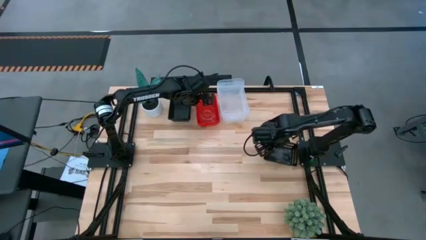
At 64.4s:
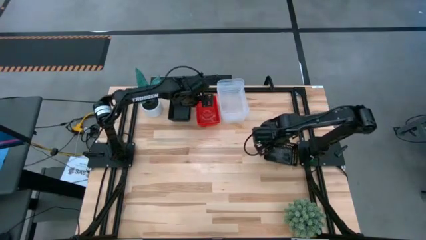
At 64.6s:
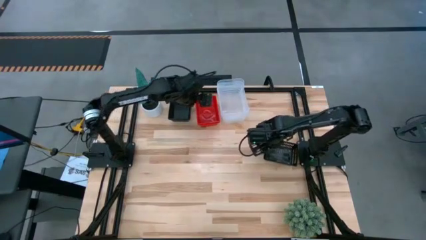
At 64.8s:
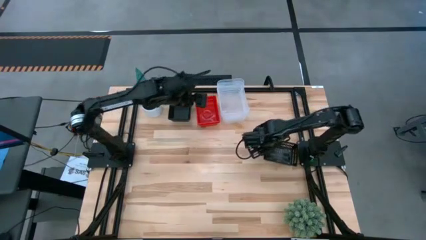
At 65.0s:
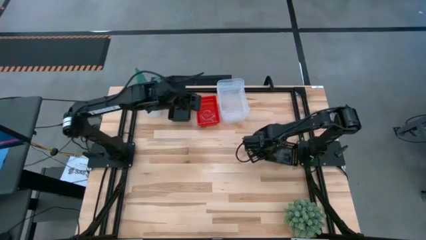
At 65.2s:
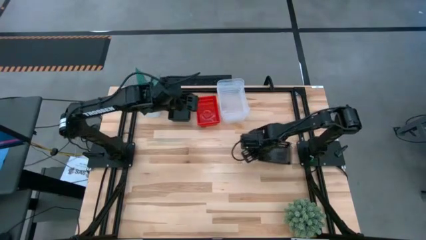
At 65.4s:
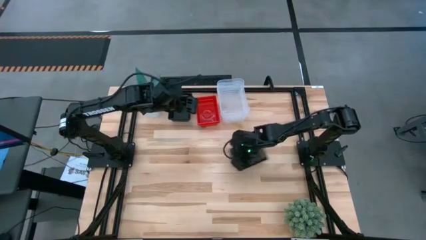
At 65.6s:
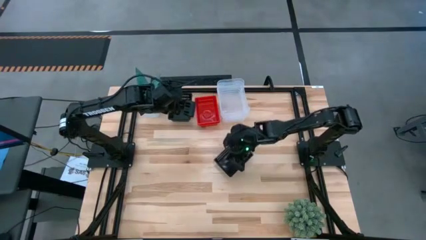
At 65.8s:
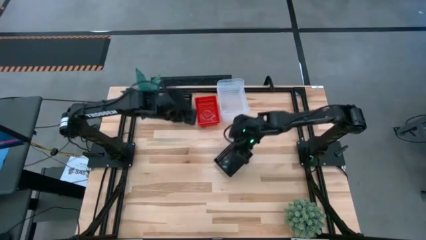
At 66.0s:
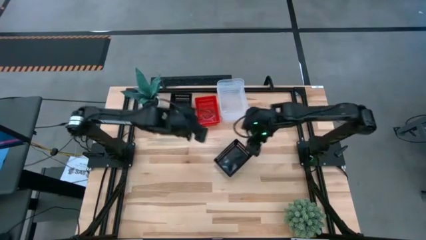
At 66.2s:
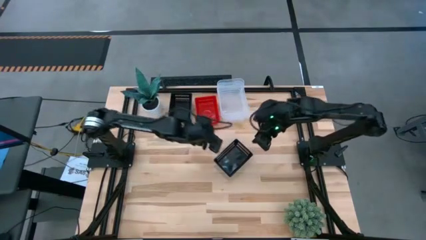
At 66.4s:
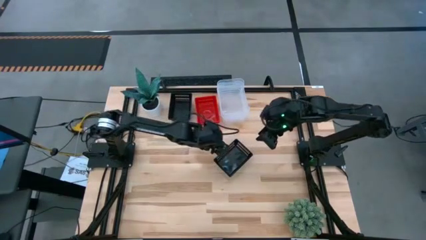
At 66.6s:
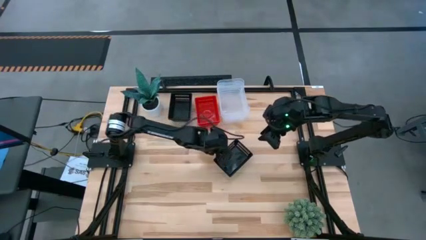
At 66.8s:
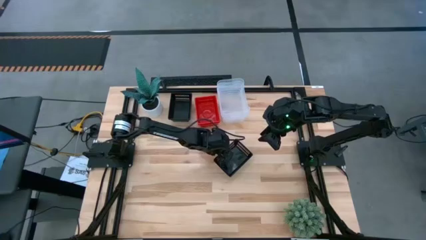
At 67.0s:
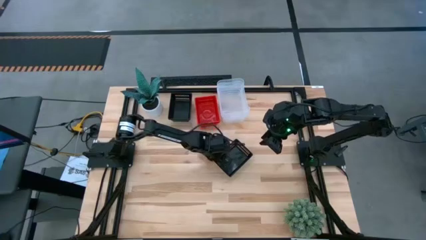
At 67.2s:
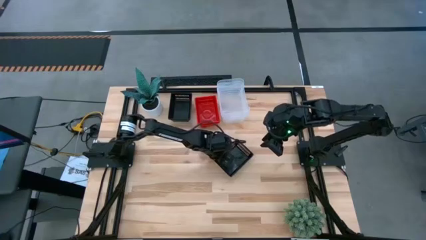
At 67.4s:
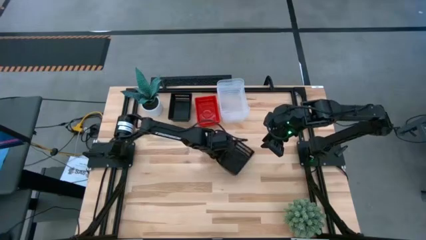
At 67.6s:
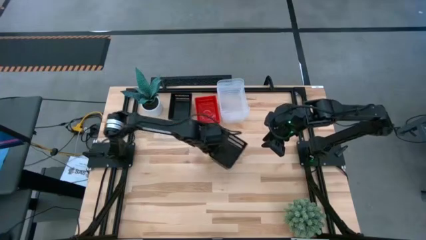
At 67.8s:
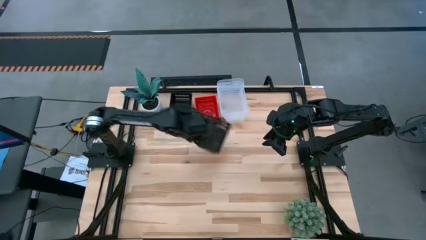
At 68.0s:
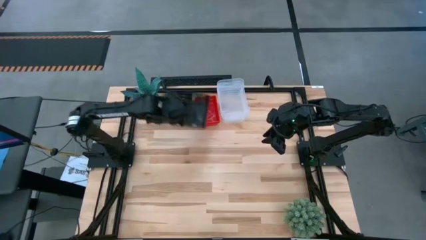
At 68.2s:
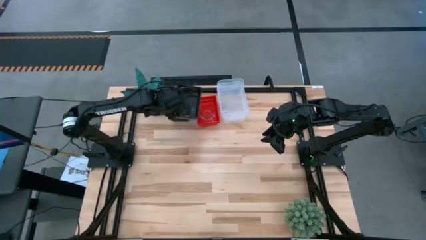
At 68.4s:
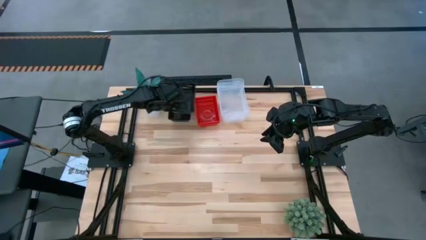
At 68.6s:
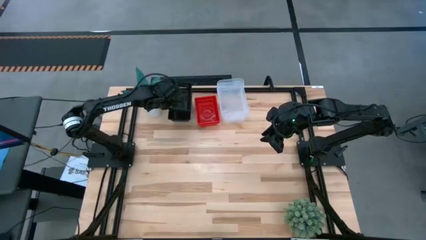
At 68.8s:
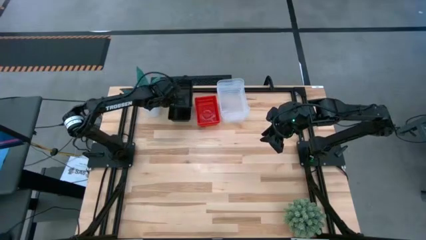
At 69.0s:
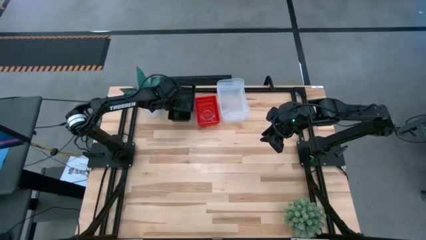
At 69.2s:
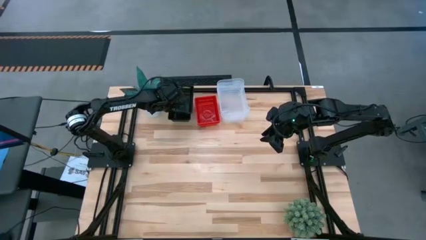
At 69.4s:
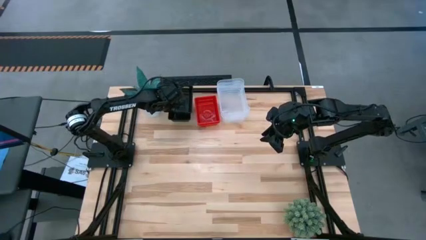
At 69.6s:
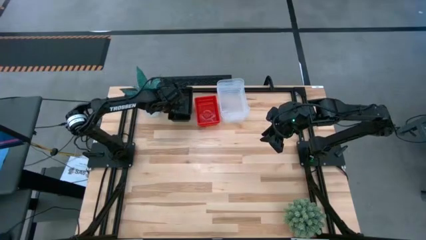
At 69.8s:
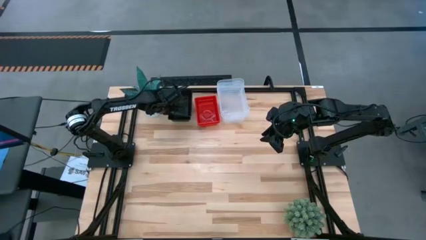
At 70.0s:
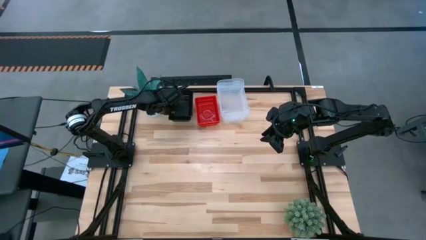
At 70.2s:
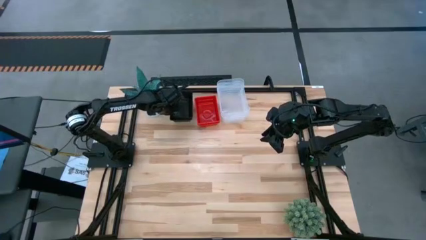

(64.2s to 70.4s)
Stack the black bin on the top black bins

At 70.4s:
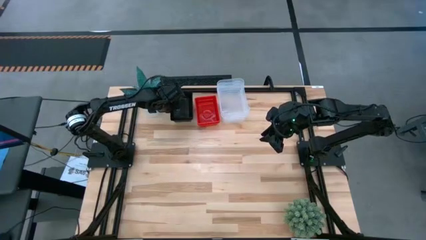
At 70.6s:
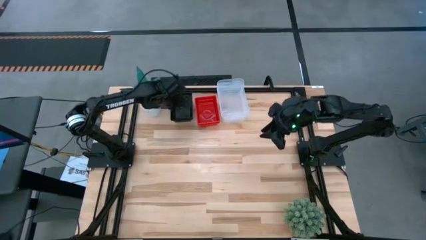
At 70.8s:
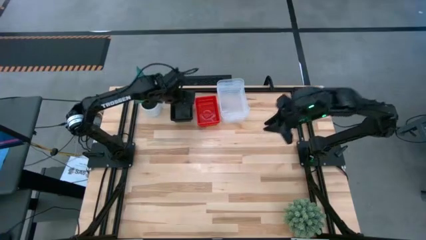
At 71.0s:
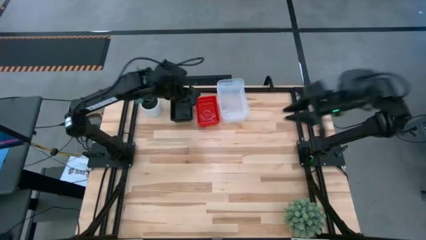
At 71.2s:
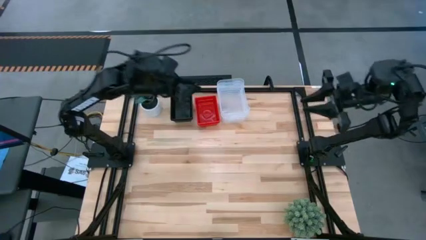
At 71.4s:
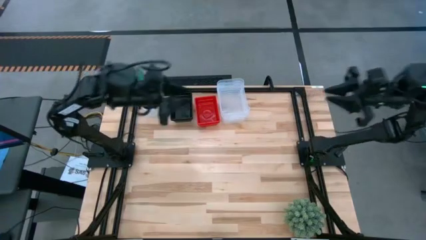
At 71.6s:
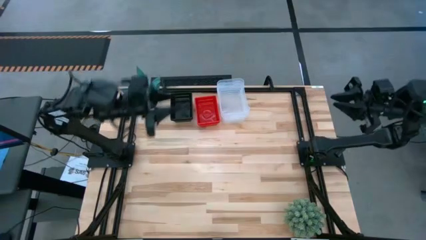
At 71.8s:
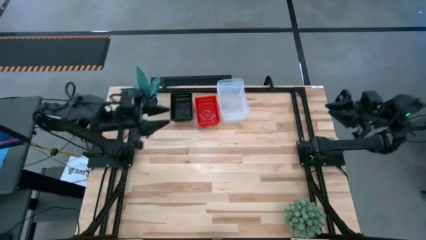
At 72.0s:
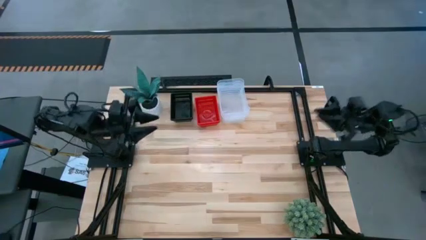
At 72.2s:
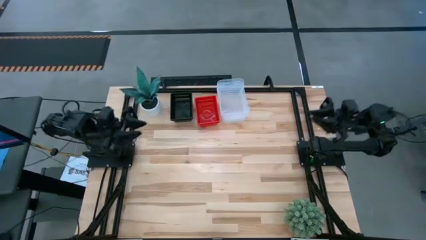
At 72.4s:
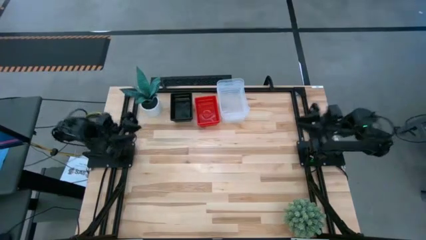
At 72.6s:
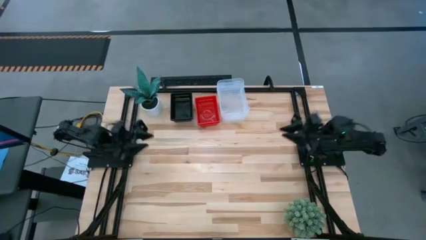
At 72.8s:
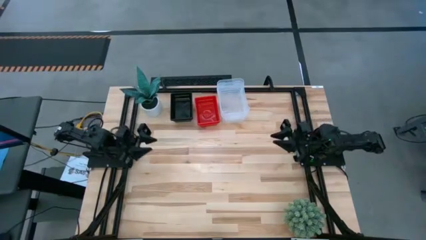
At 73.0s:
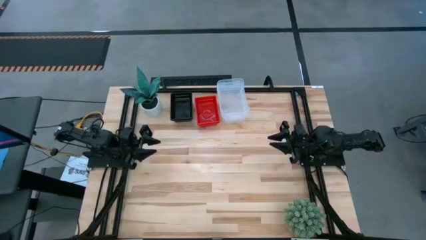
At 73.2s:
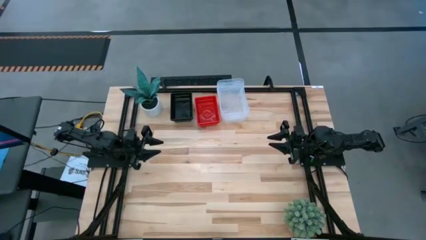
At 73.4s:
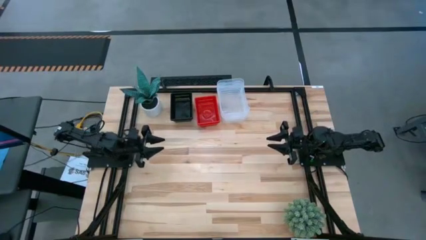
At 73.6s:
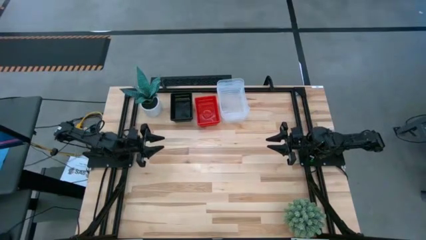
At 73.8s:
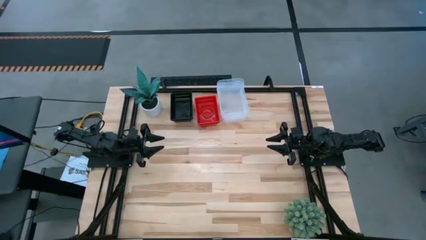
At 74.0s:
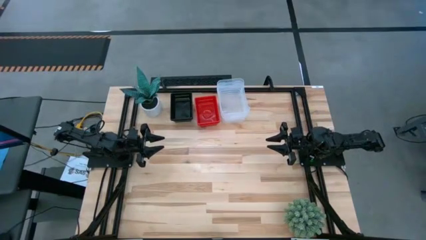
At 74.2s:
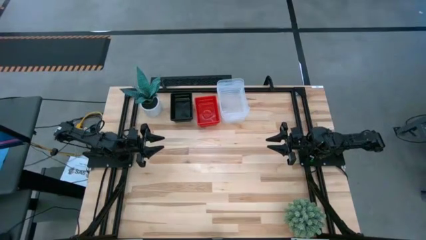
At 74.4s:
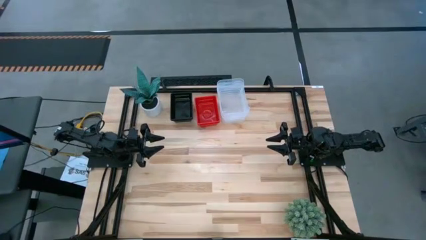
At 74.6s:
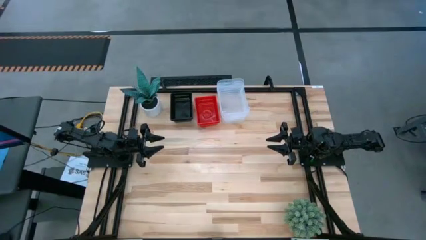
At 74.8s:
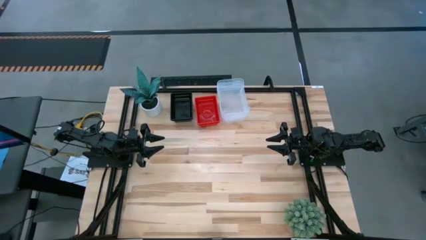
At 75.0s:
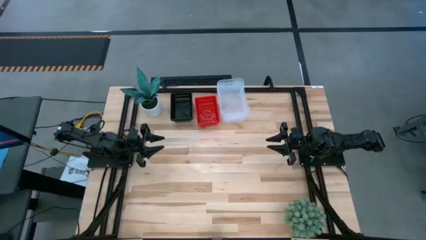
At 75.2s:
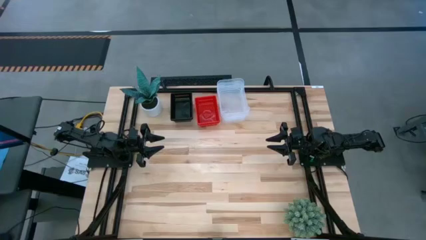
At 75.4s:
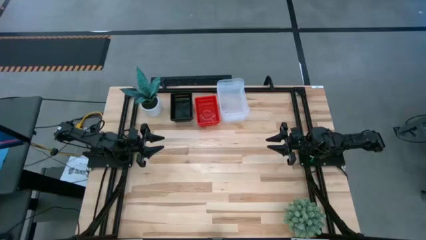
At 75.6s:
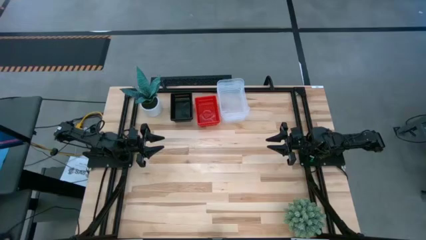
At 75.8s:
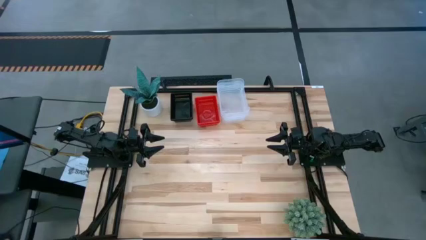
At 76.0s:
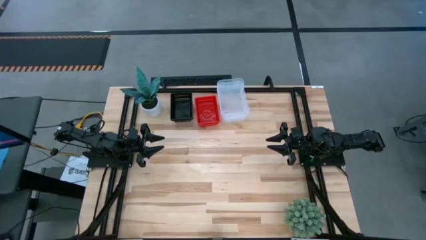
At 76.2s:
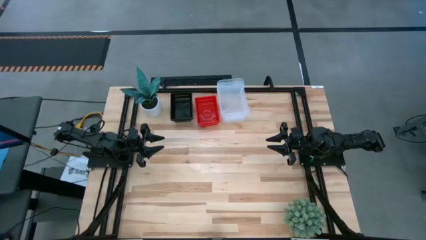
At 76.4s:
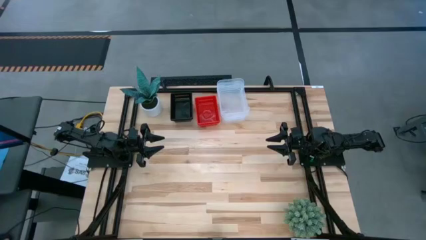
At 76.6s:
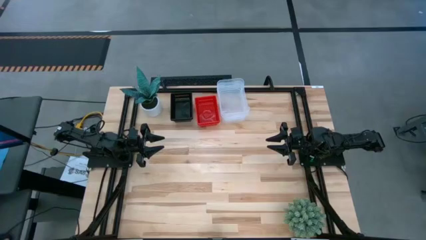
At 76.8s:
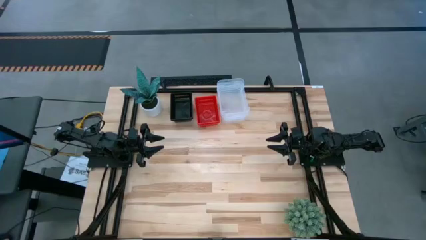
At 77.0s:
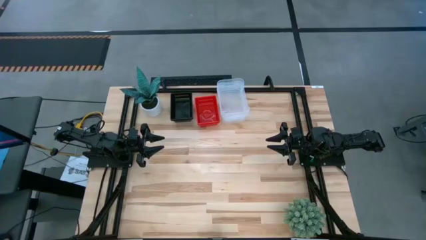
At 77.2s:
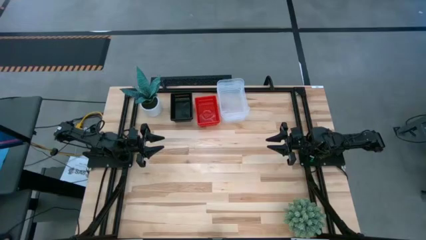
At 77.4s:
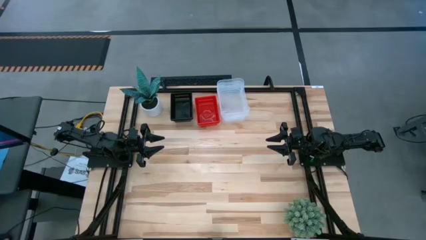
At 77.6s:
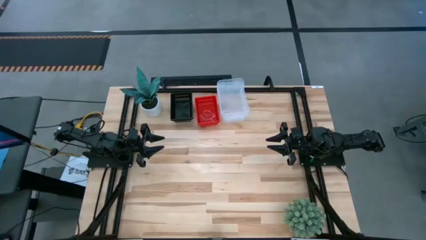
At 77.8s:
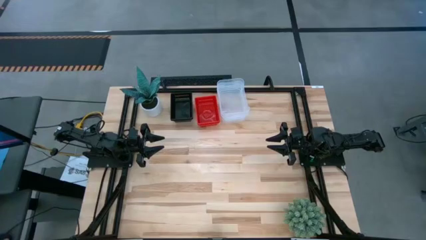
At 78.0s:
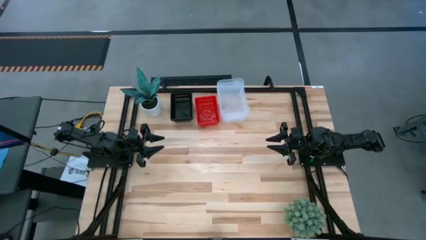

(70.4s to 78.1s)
Return to Home Position

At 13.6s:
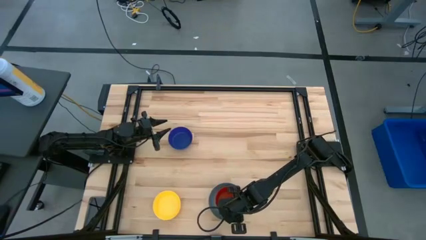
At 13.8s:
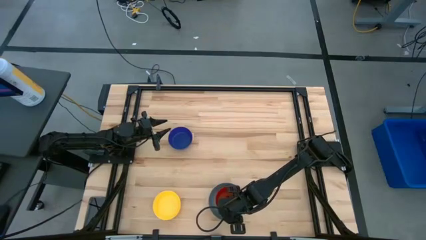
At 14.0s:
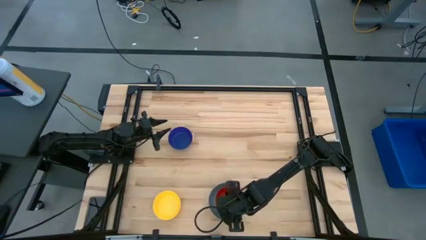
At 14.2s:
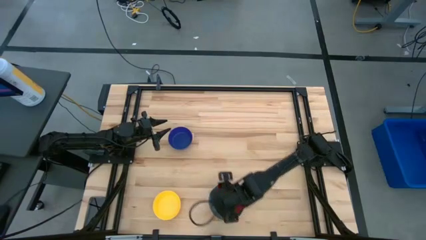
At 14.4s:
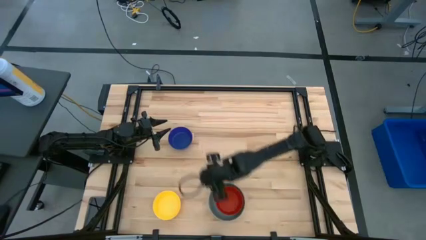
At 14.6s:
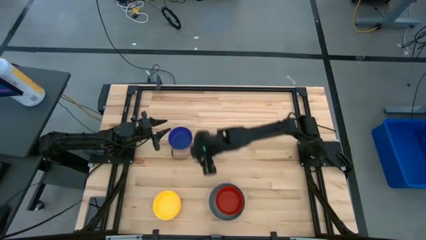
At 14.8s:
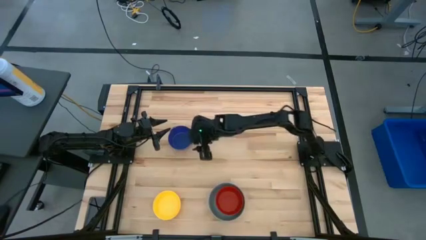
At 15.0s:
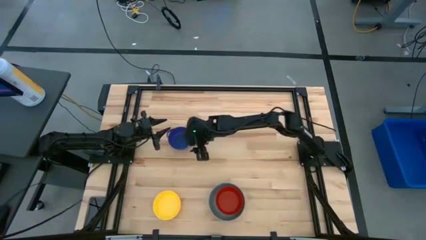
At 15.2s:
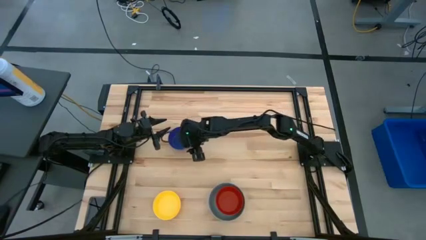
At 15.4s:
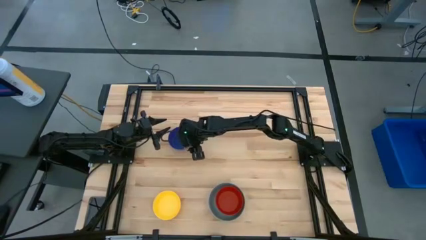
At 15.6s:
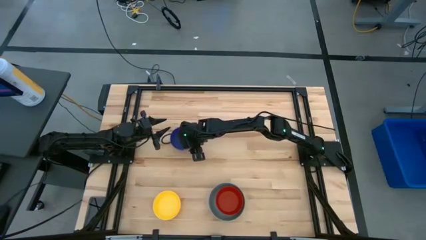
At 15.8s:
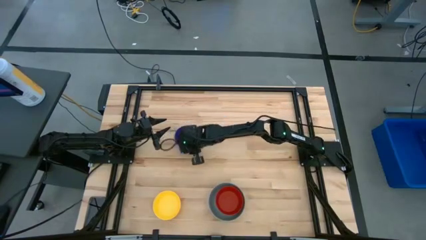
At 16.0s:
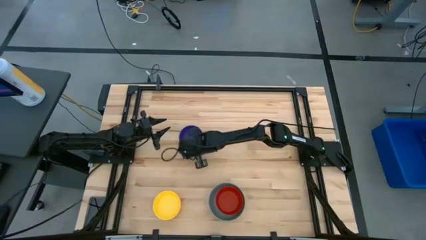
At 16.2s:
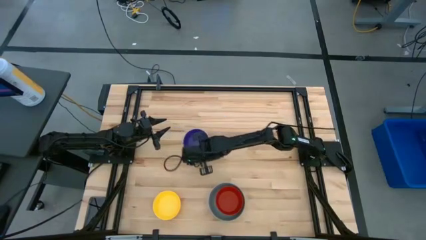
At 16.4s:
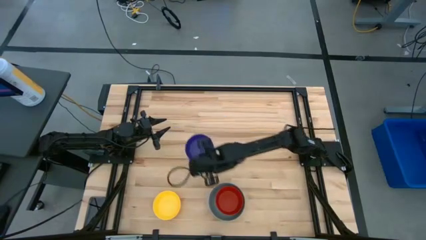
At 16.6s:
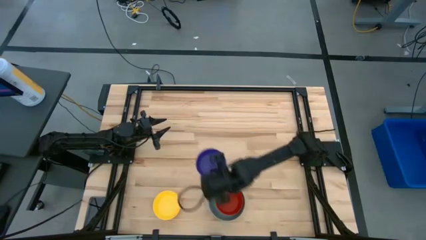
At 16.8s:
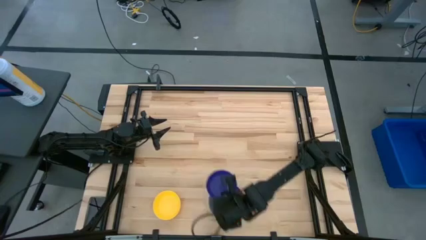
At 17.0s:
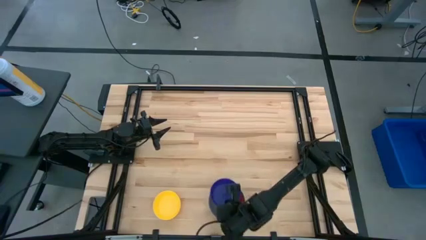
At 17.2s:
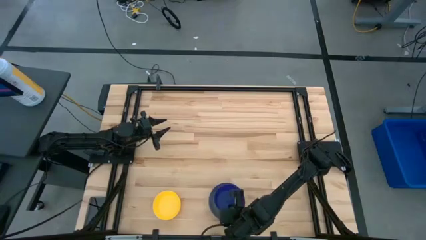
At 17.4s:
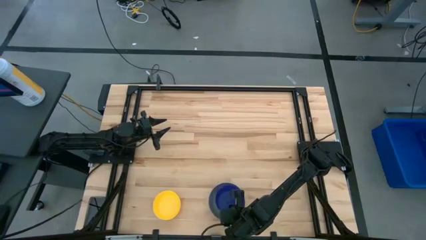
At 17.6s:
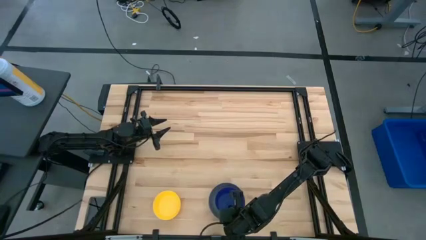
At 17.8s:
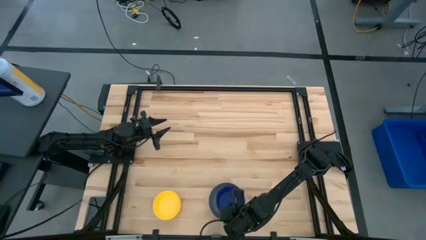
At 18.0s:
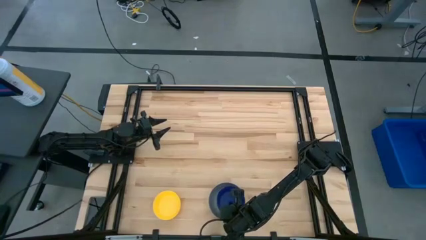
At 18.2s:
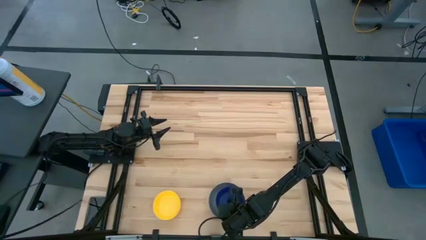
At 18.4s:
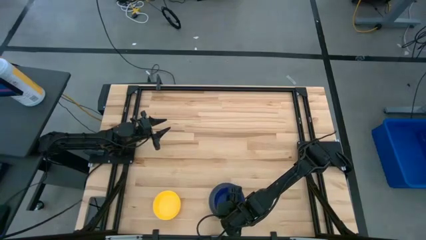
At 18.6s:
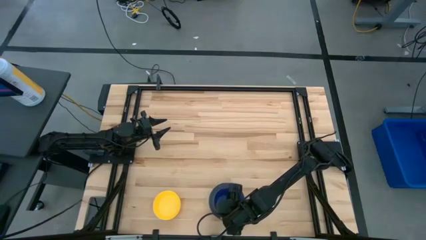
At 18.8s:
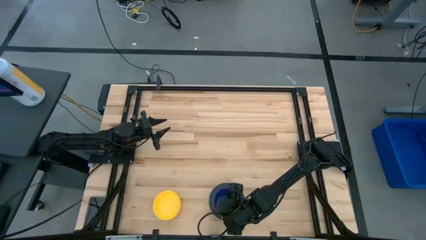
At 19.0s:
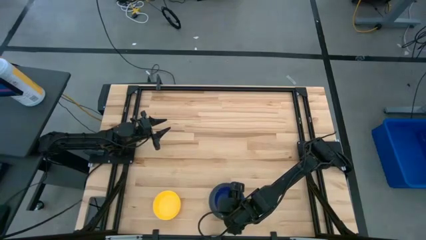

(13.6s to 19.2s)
Stack the blue bowl on top of the red bowl
